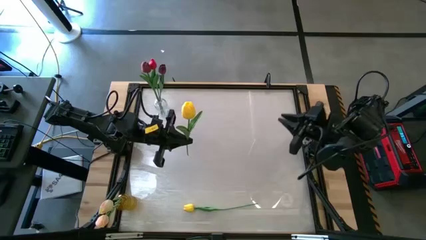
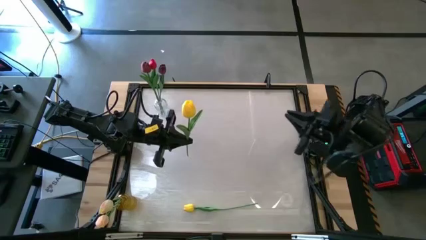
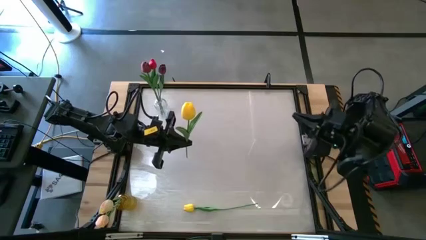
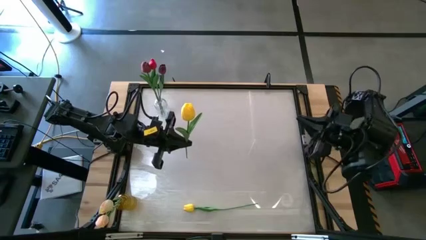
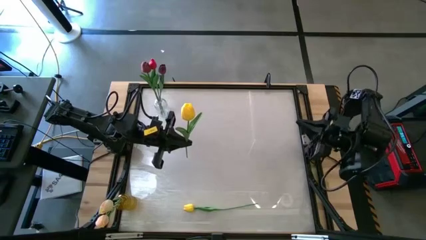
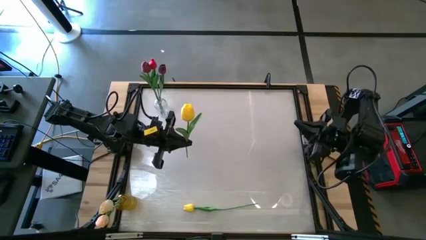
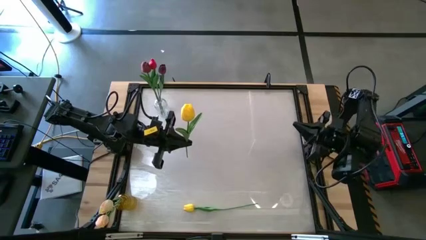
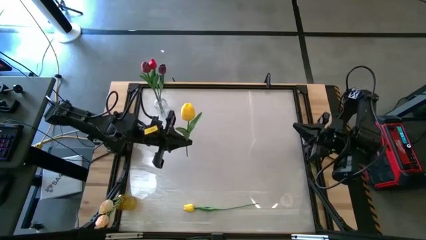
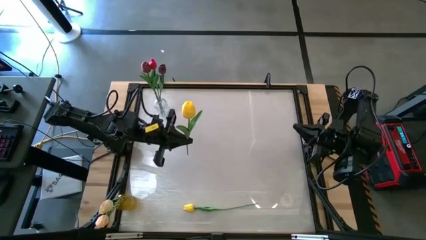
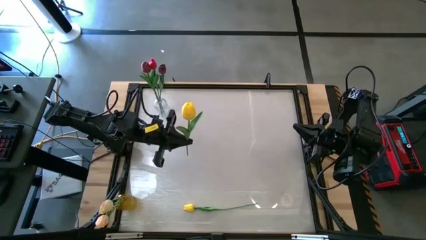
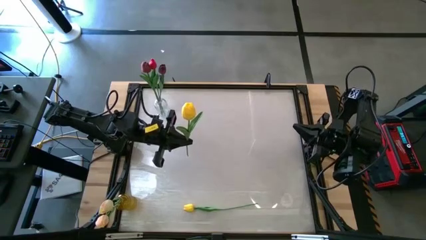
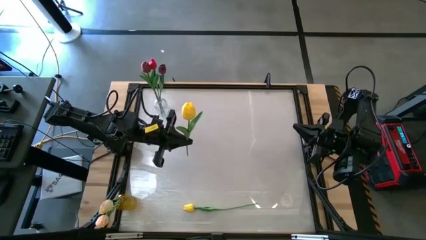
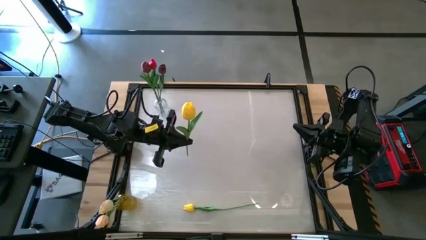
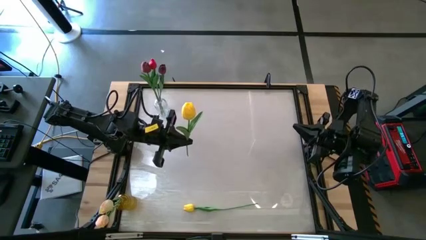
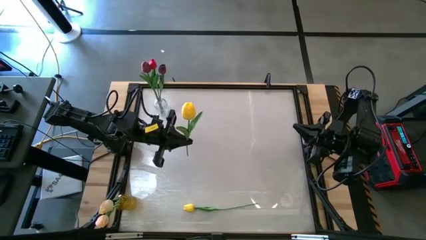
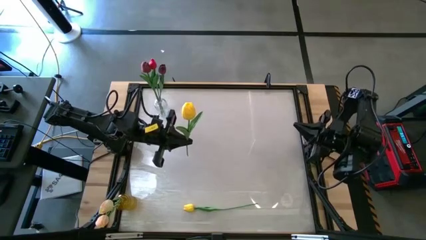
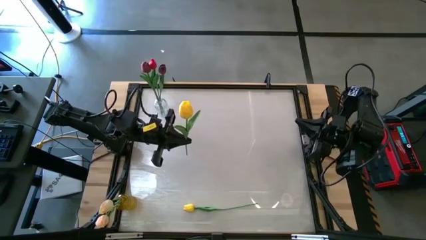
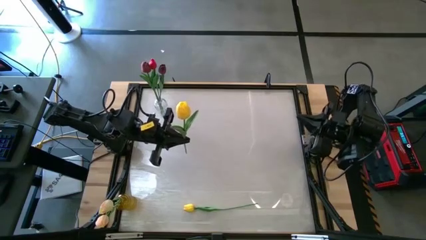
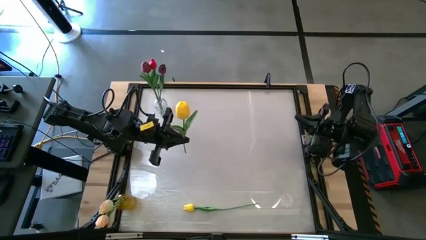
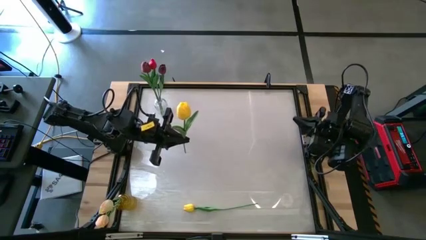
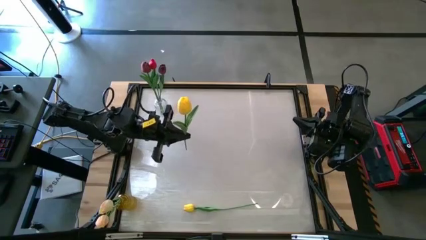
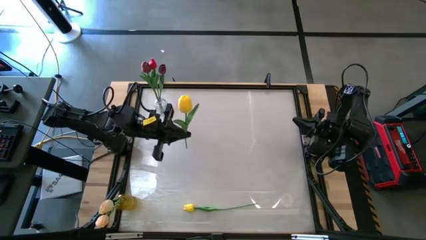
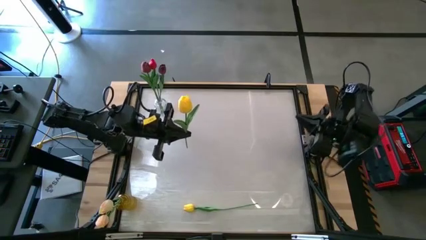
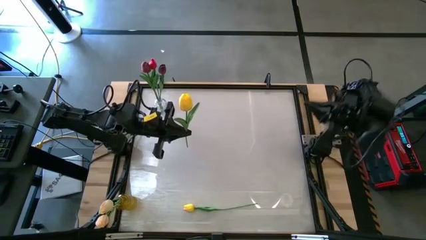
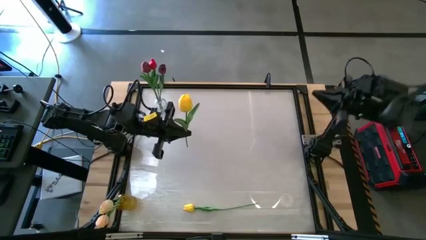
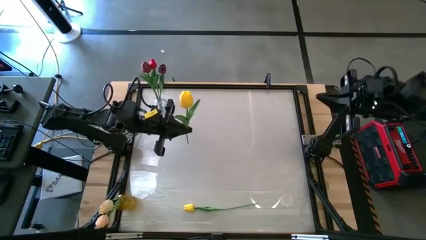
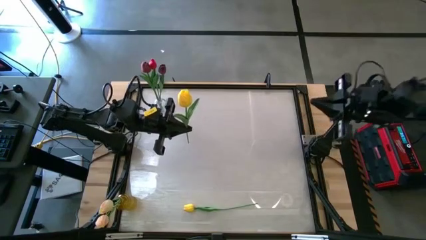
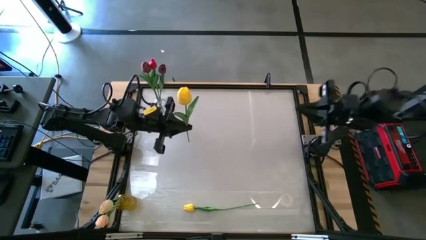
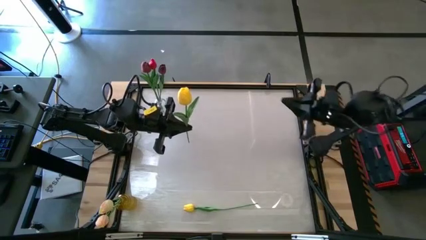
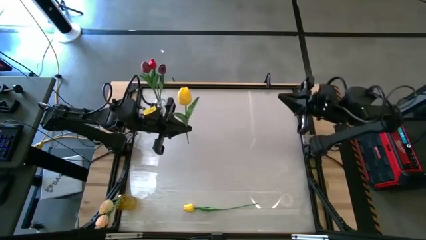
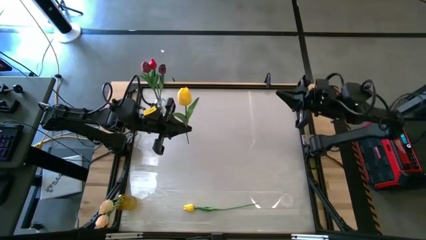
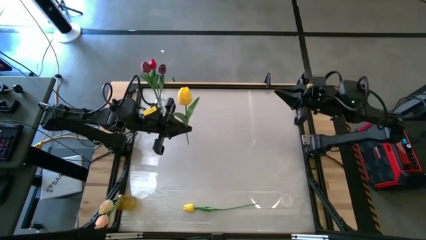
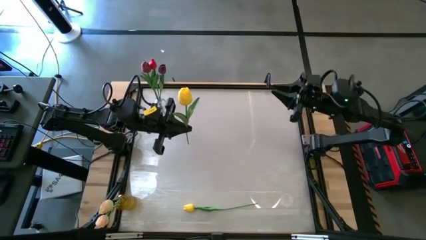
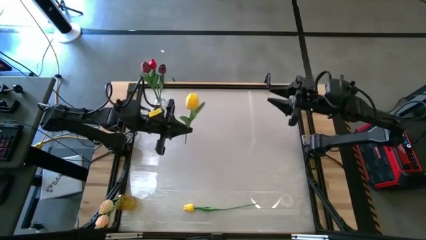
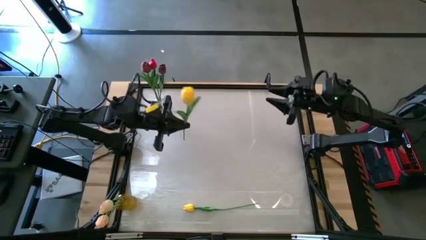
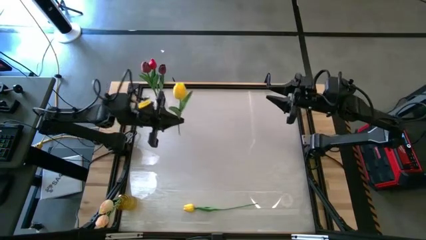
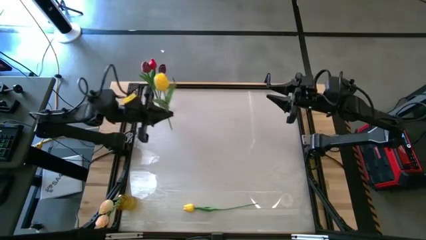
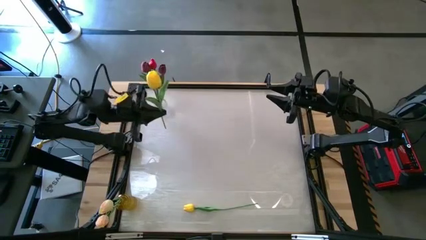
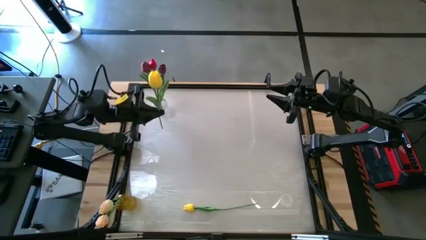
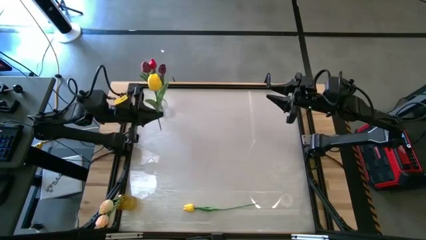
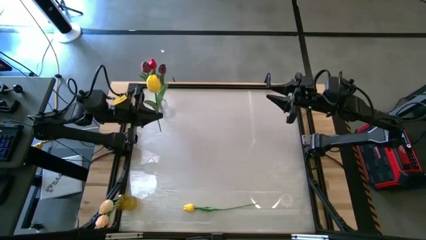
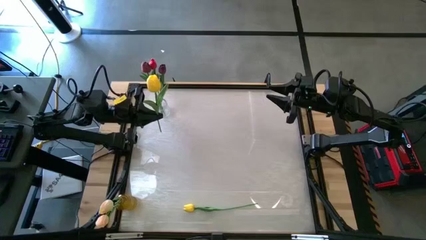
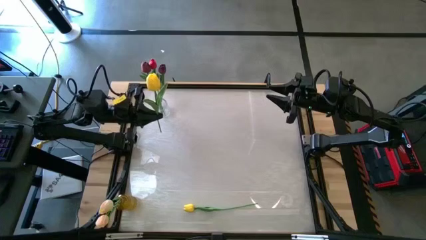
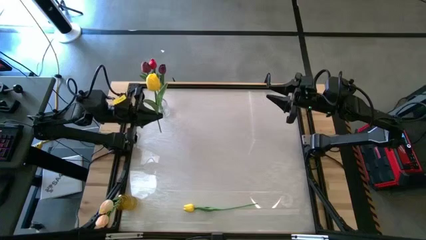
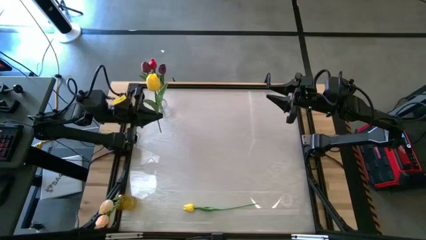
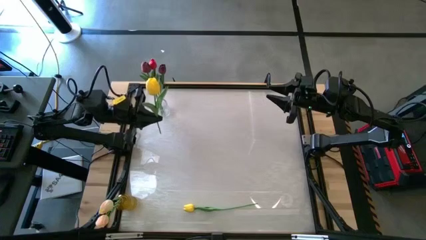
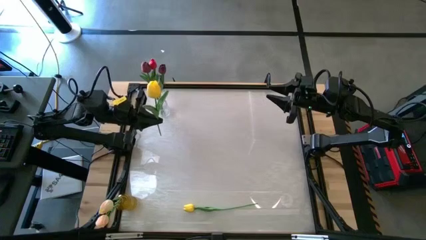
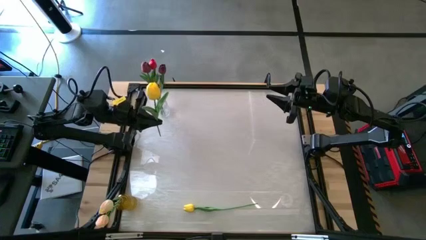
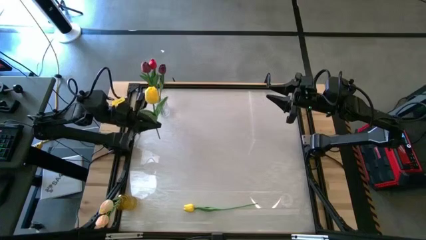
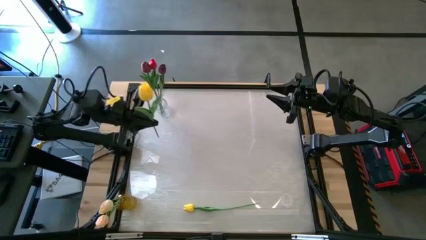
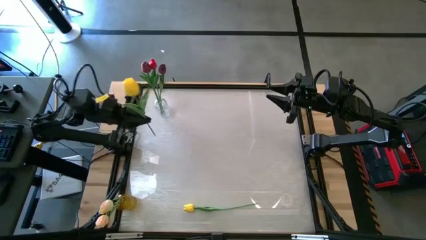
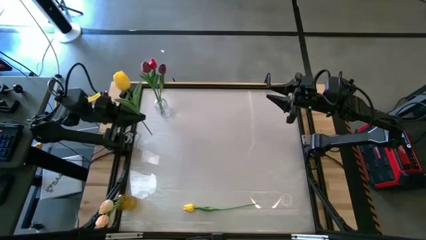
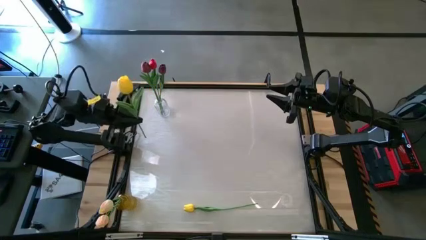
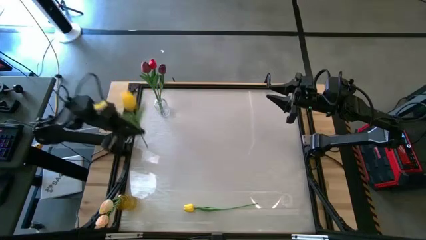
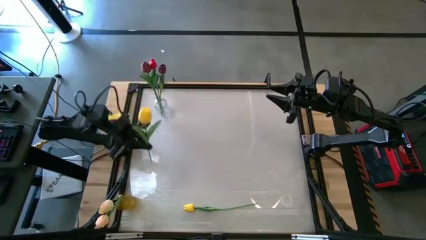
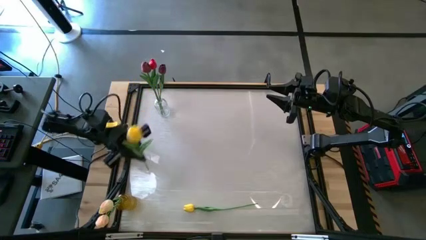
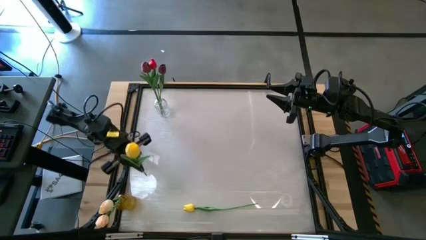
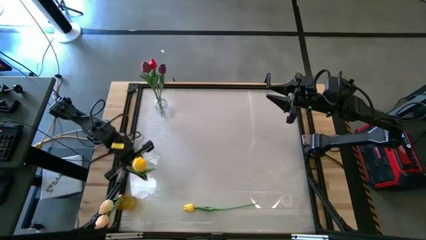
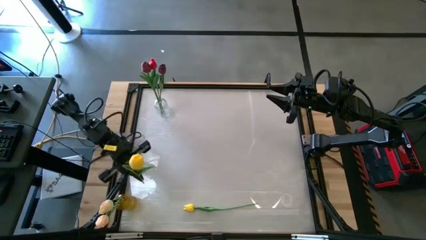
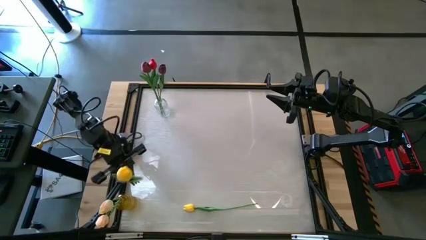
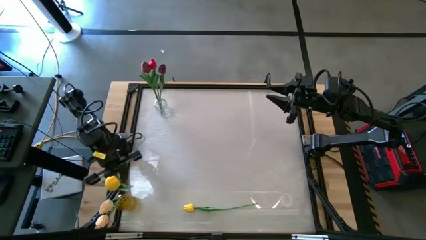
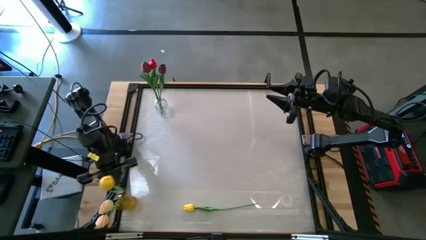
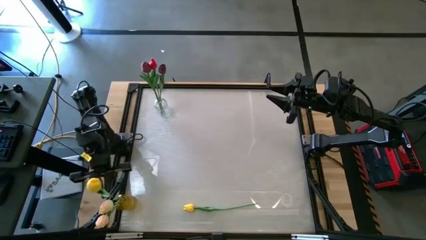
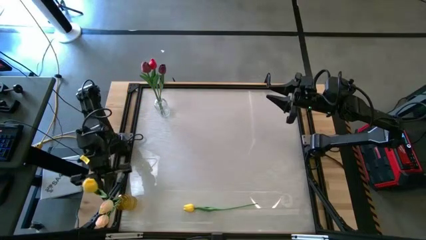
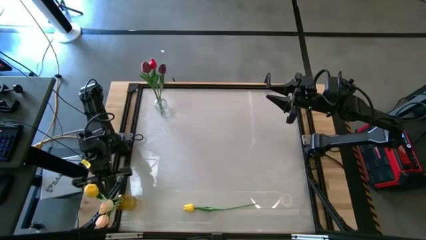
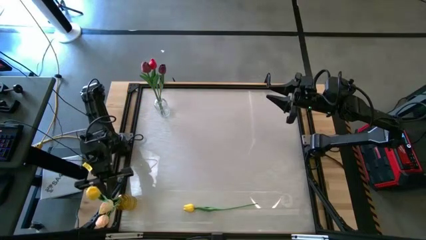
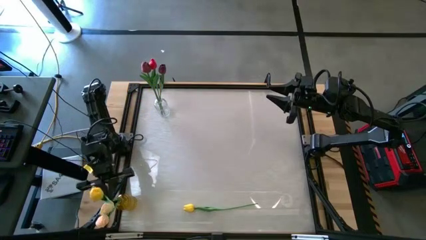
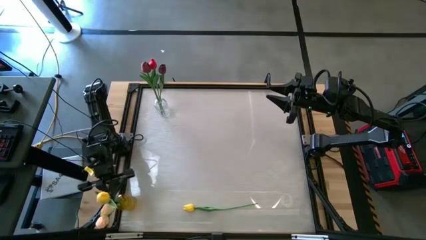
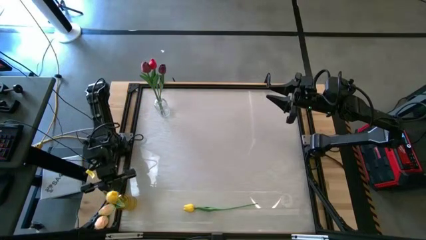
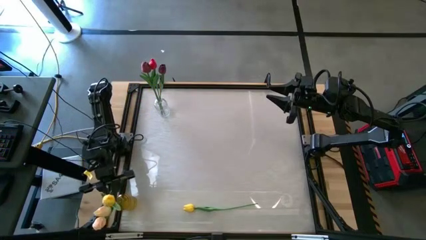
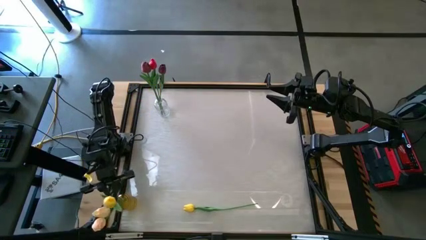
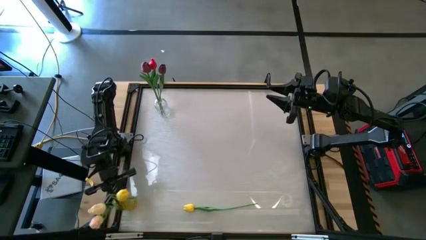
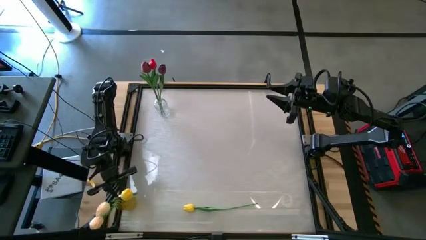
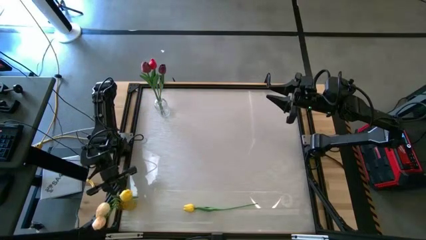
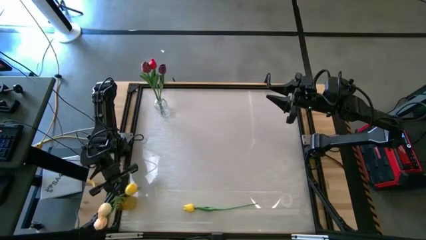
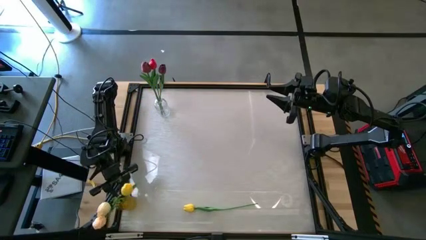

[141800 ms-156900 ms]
Task: Sort flowers into vase by color
Put the top yellow flower into the yellow vase
